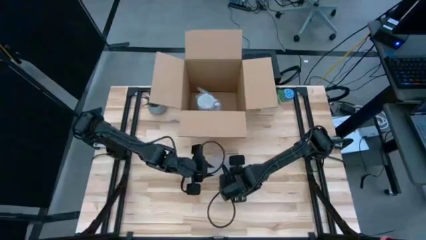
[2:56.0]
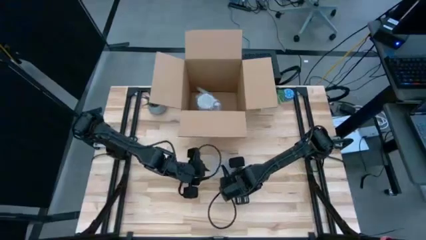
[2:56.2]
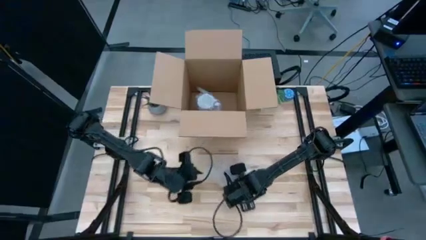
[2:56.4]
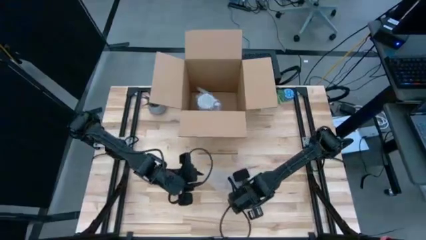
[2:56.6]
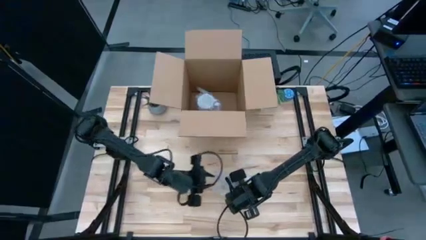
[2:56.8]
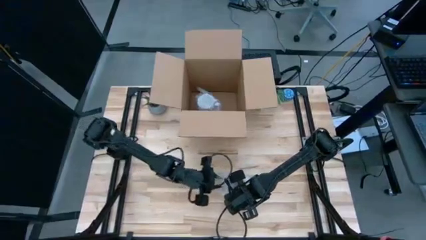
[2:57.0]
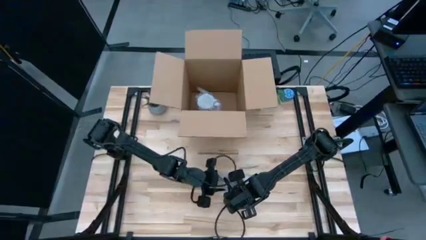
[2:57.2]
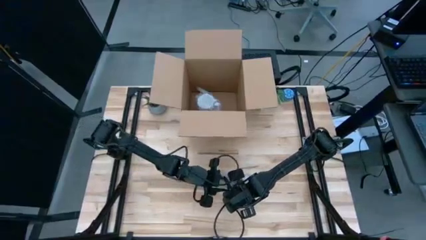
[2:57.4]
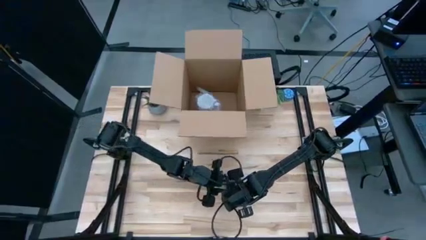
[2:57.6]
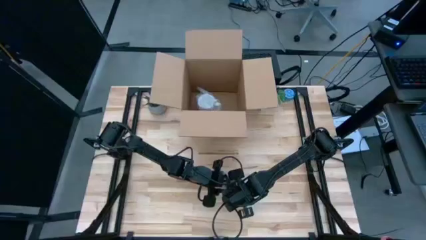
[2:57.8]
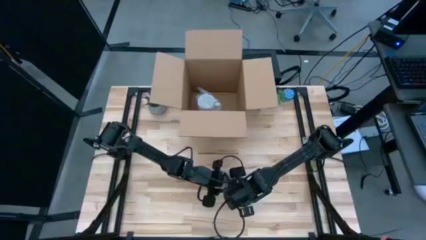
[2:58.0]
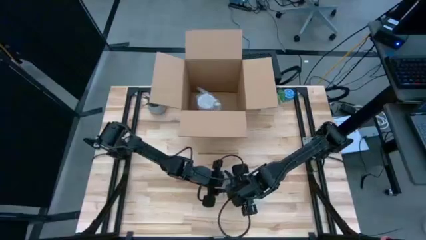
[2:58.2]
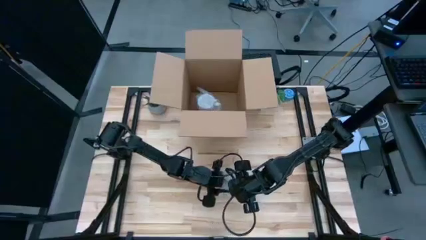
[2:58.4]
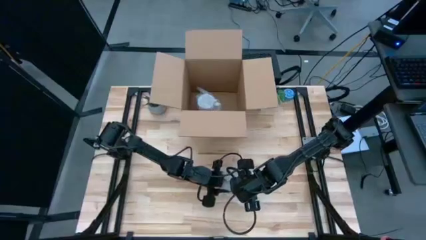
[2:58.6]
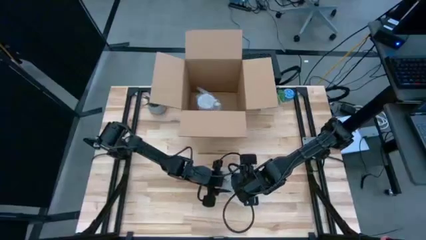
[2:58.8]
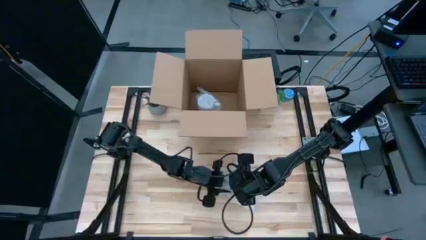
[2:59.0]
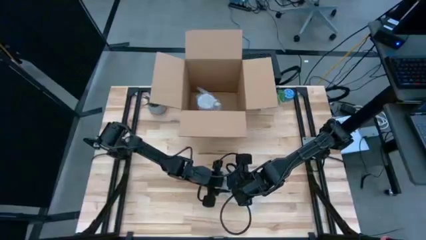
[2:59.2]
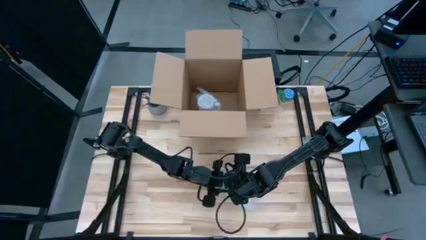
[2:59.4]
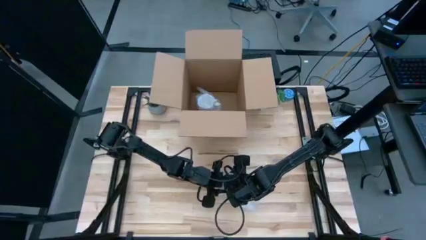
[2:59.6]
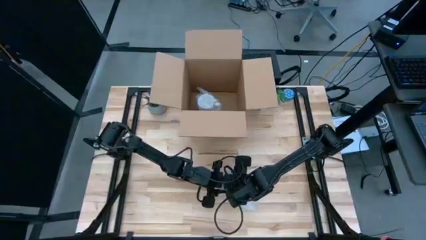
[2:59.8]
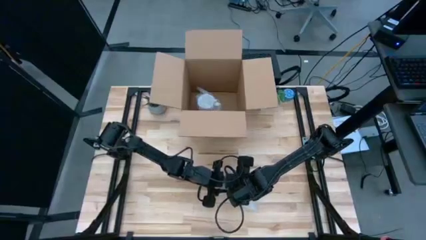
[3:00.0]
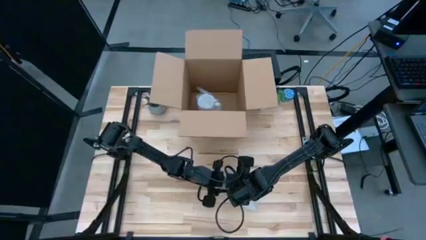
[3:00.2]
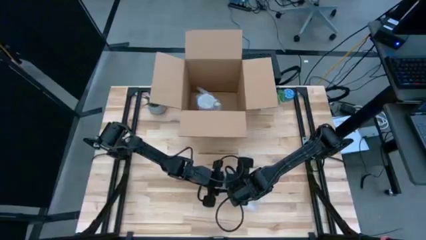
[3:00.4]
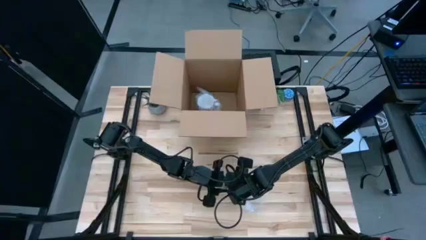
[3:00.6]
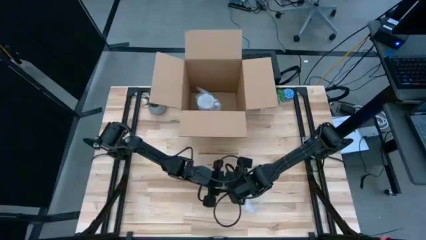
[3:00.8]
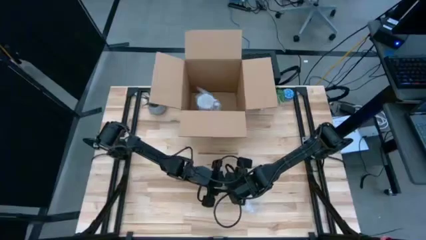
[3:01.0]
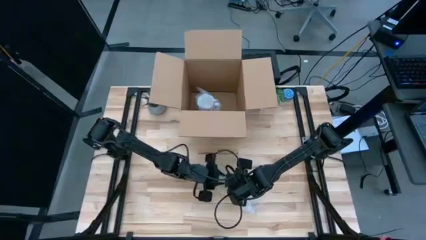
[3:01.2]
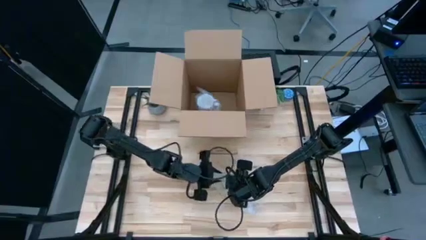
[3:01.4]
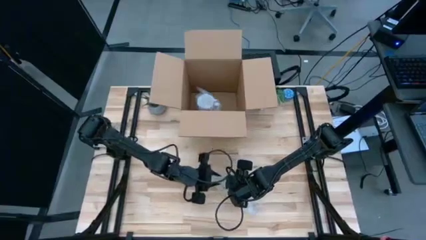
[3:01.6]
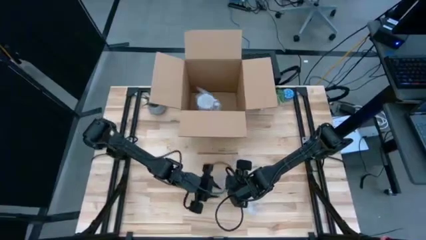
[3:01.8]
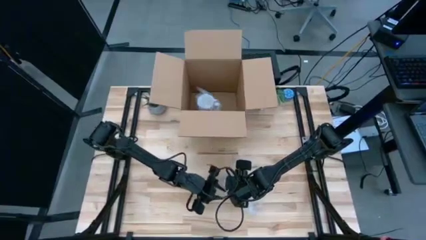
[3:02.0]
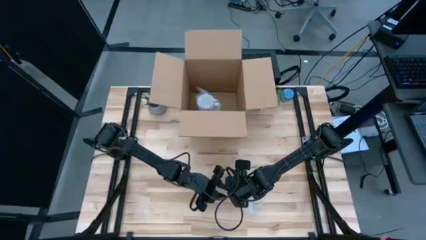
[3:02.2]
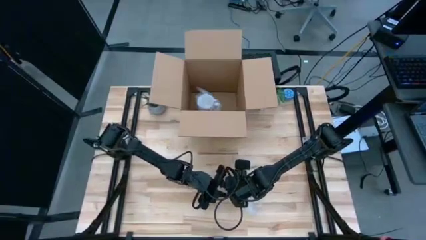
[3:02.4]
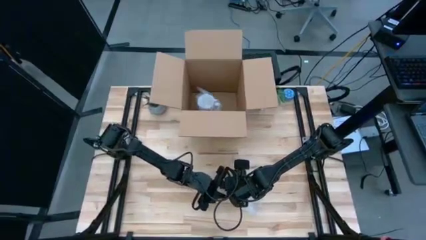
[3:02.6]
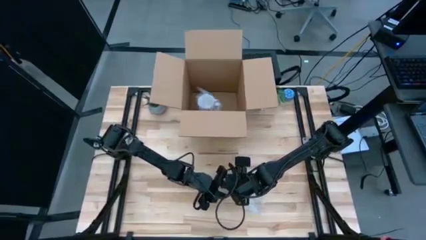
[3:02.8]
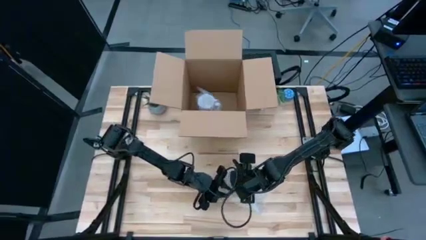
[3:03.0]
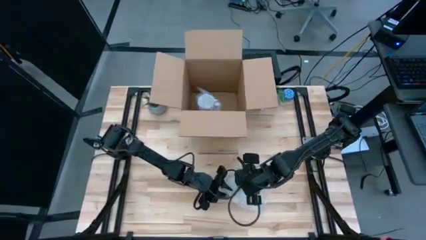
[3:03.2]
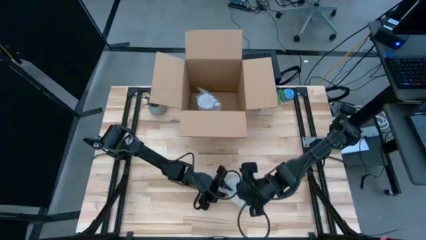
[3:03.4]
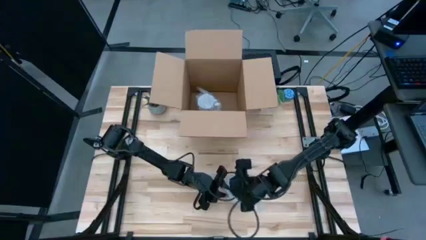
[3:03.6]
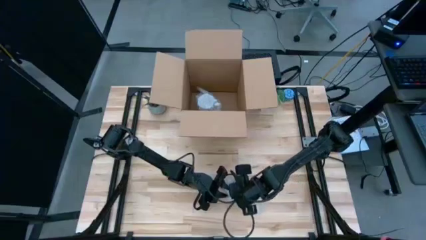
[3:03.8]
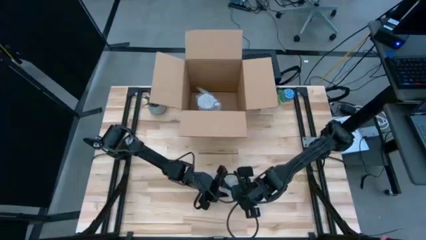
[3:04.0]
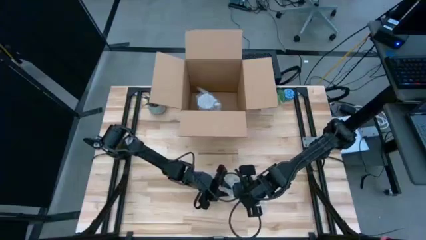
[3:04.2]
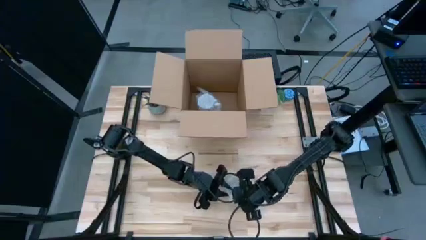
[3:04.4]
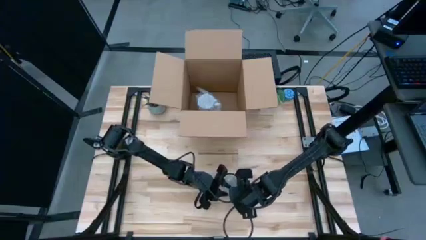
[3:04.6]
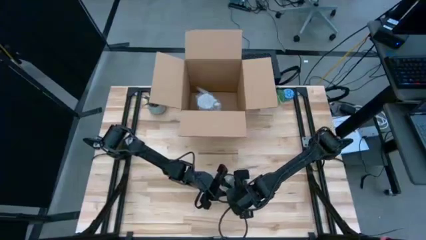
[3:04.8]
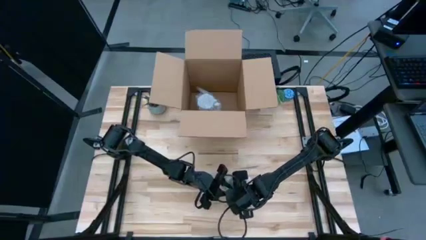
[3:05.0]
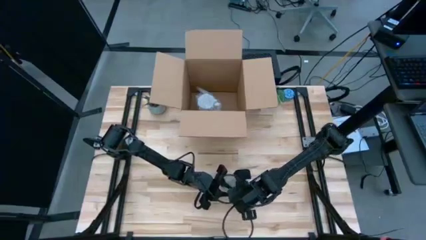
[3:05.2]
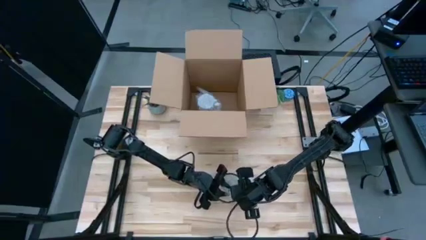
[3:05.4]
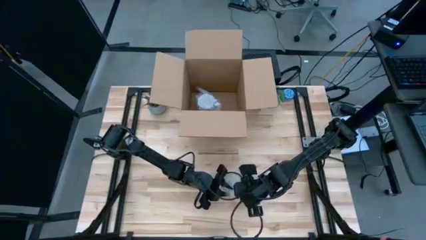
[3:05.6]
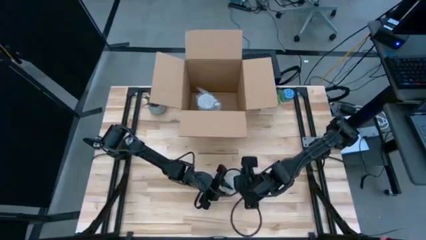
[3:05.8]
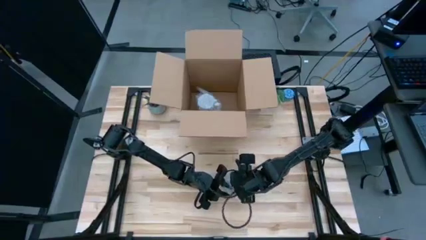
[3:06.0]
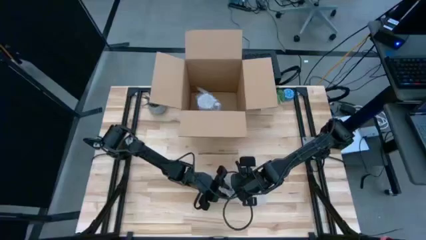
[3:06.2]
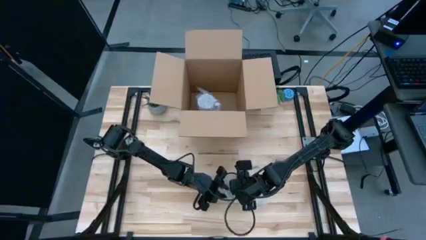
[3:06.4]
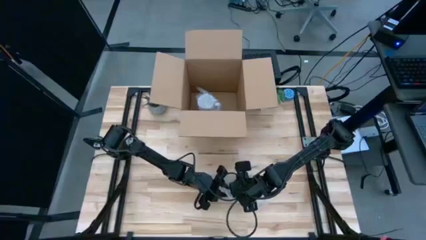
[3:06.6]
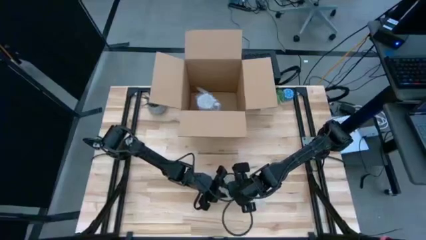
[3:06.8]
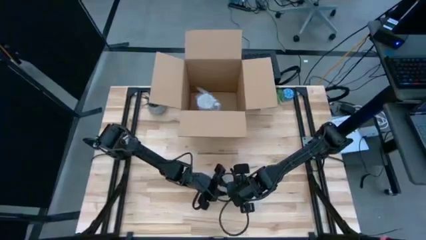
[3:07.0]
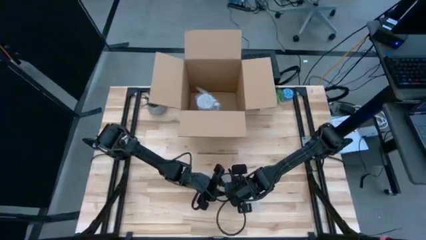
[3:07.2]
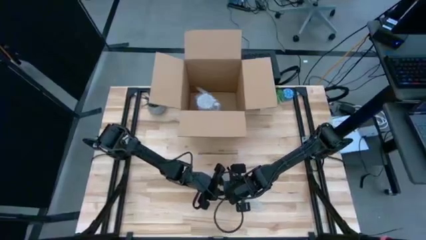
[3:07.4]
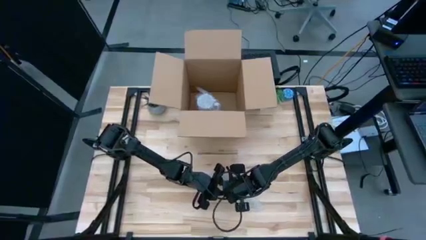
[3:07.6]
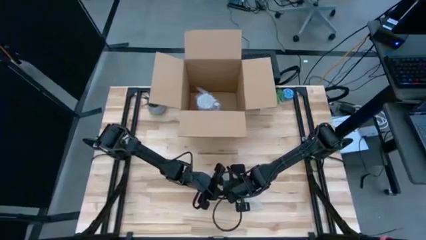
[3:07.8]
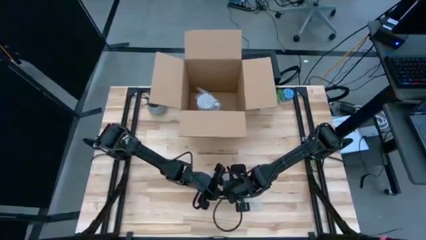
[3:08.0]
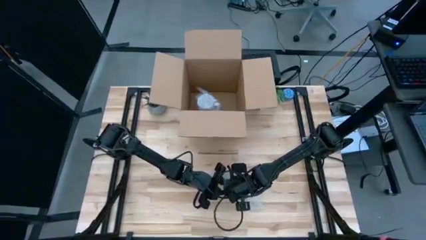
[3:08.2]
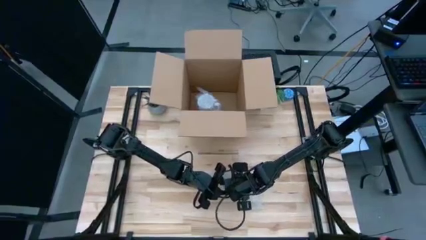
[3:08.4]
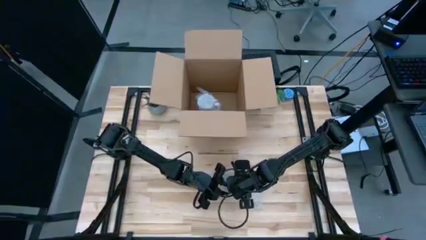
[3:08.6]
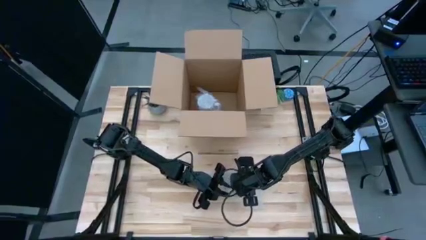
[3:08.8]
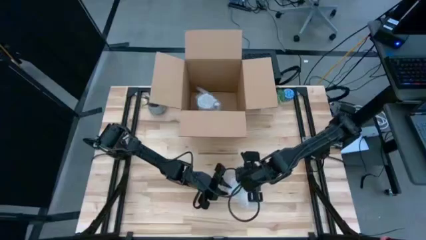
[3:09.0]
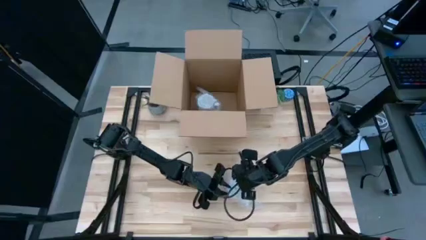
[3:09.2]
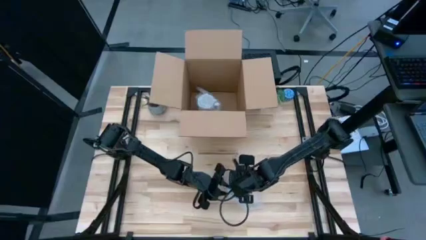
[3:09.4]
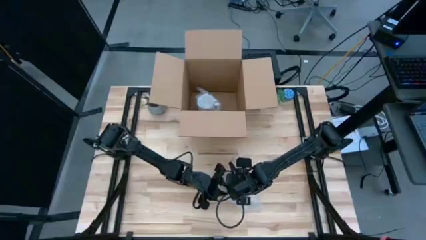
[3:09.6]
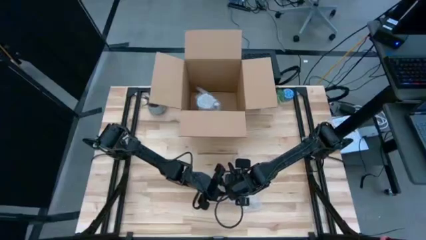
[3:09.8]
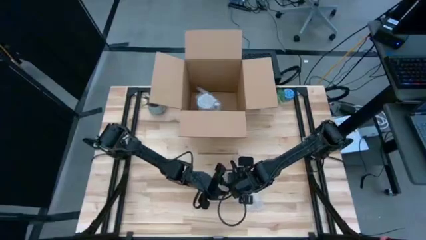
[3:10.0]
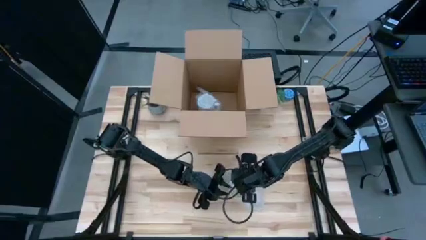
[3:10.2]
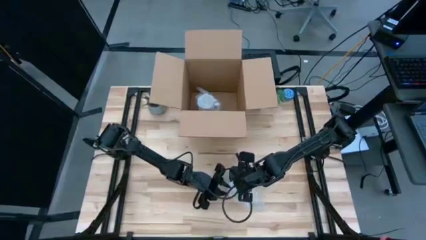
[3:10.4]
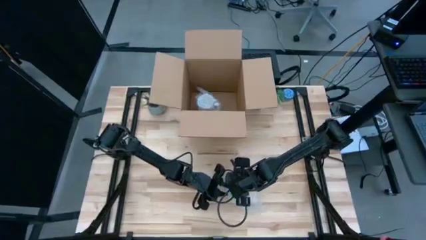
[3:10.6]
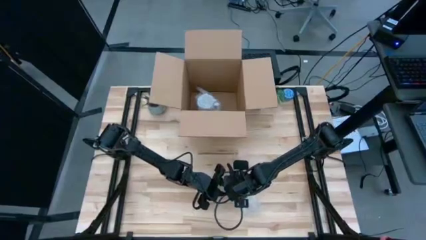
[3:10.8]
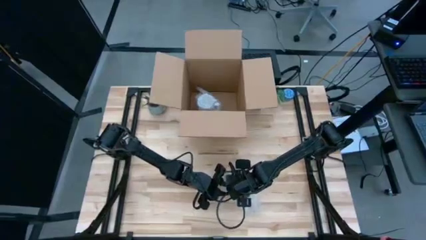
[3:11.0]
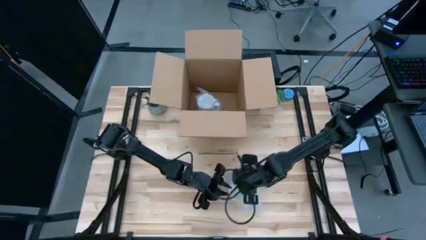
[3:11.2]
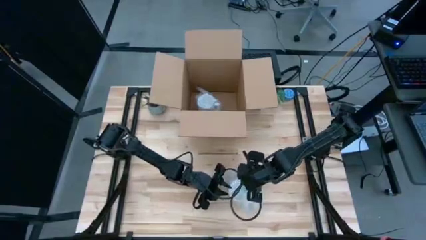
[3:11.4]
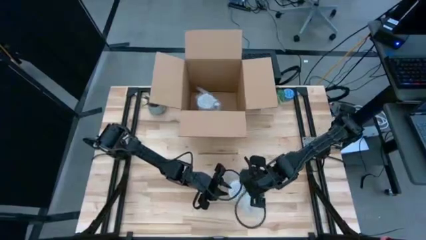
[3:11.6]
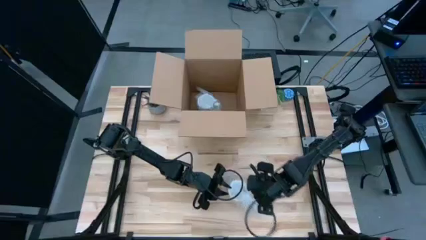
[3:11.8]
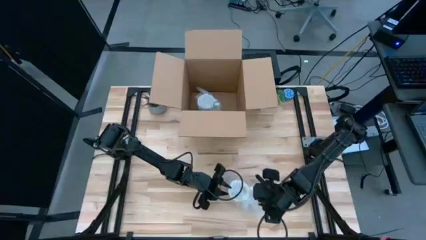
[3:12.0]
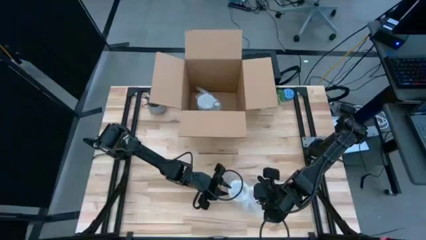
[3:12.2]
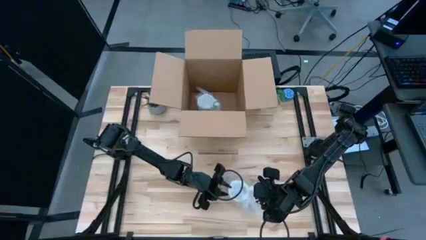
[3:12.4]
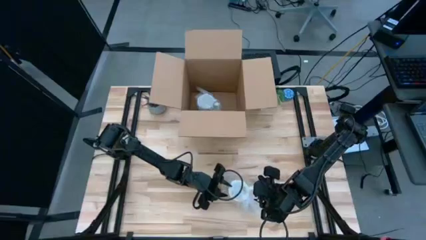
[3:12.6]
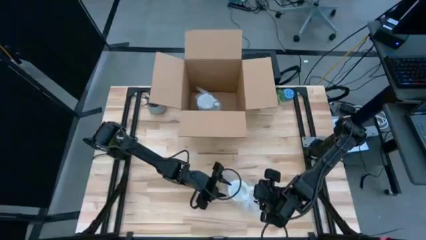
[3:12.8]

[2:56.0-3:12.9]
Task: wrap mug
Wrap the orange mug with bubble wrap
